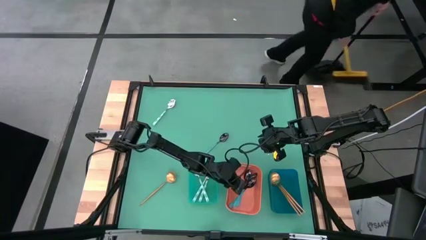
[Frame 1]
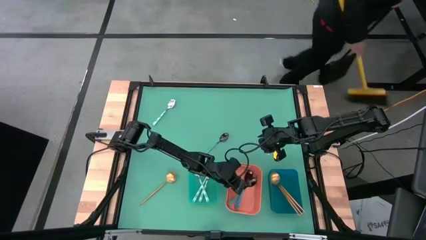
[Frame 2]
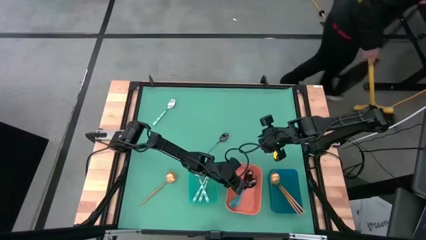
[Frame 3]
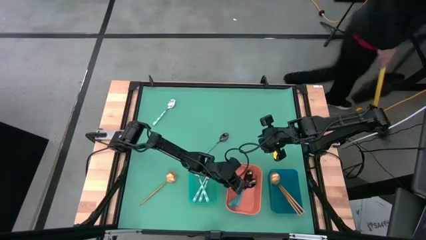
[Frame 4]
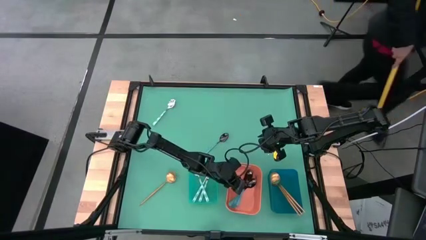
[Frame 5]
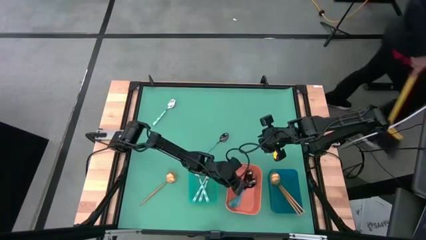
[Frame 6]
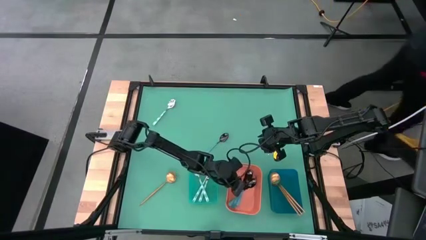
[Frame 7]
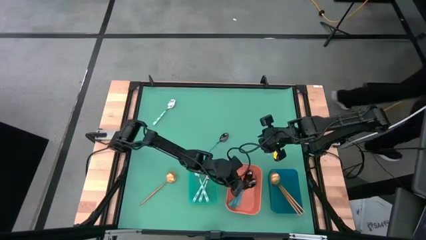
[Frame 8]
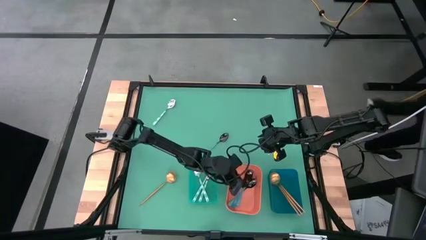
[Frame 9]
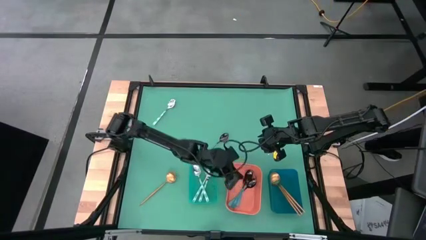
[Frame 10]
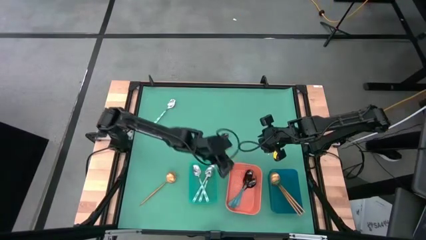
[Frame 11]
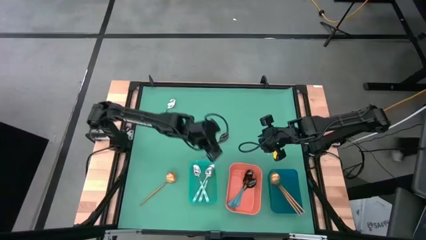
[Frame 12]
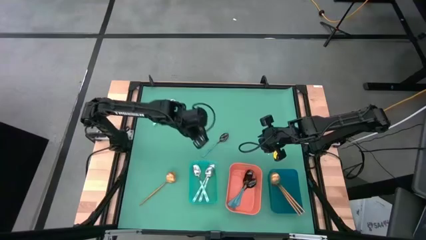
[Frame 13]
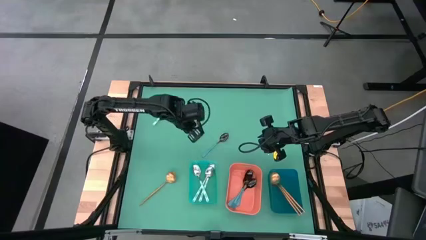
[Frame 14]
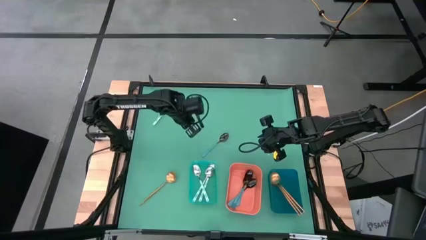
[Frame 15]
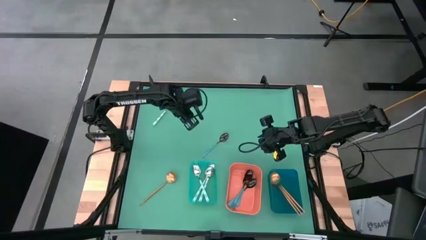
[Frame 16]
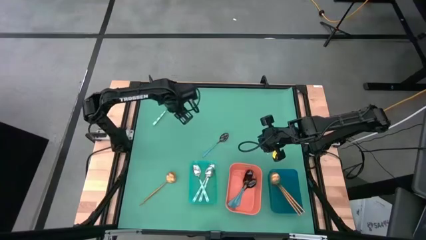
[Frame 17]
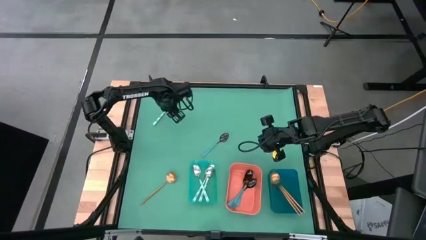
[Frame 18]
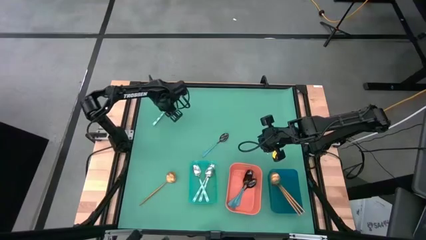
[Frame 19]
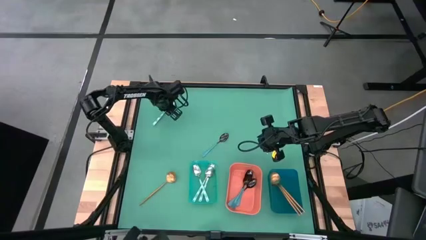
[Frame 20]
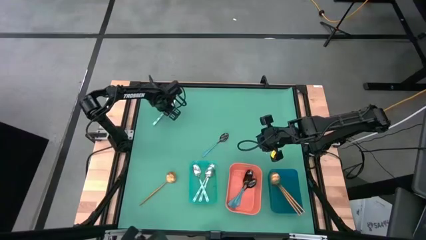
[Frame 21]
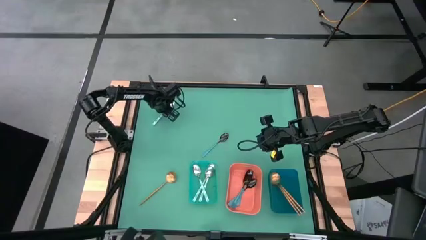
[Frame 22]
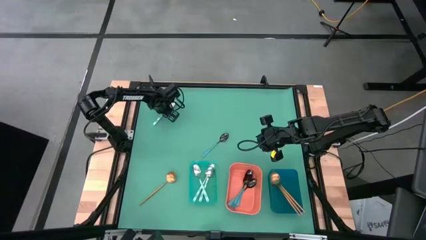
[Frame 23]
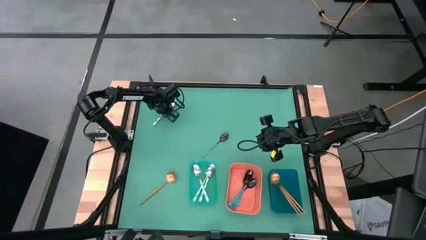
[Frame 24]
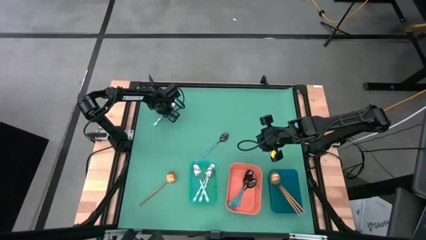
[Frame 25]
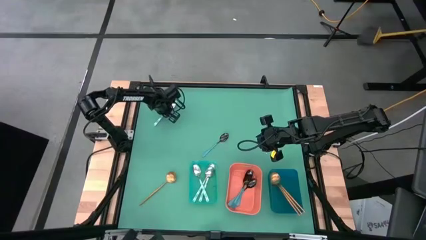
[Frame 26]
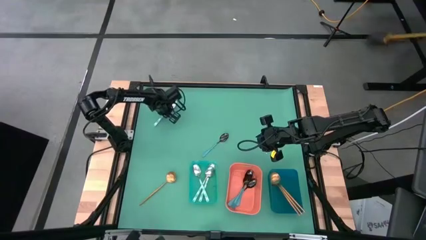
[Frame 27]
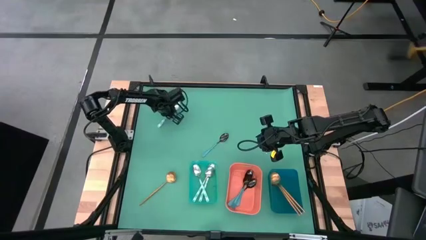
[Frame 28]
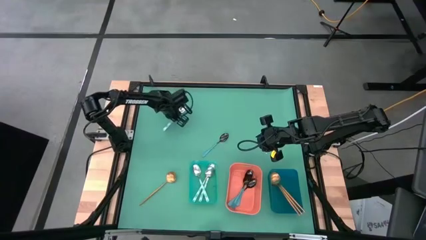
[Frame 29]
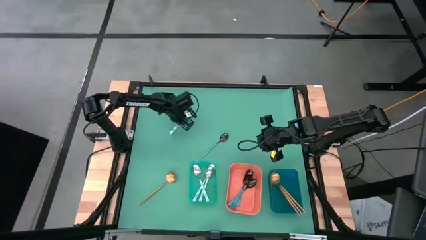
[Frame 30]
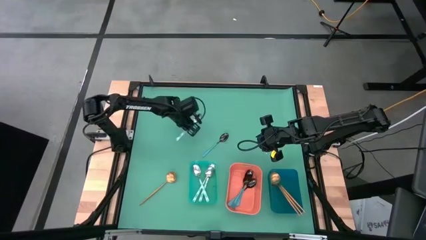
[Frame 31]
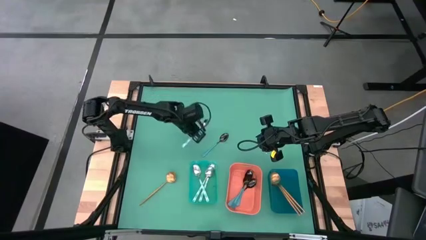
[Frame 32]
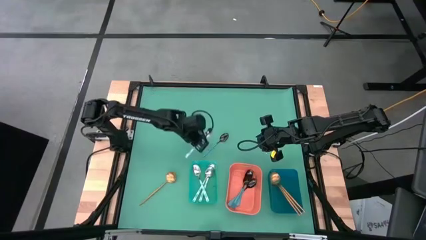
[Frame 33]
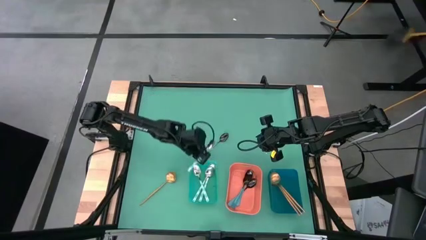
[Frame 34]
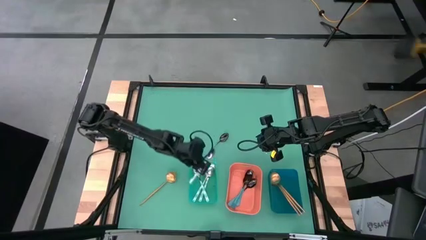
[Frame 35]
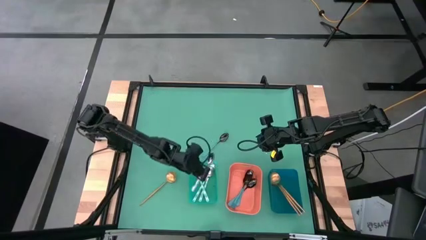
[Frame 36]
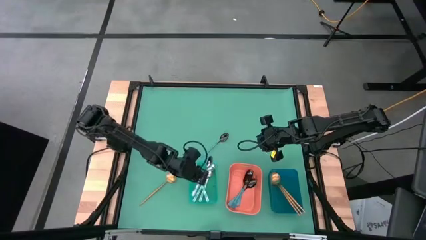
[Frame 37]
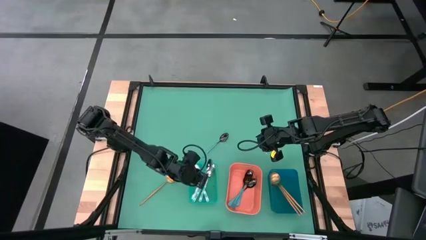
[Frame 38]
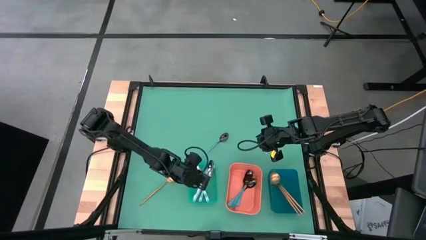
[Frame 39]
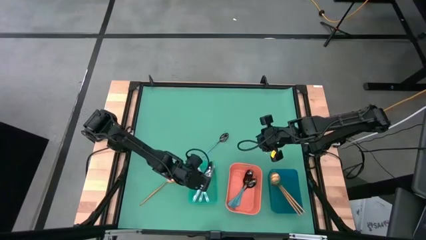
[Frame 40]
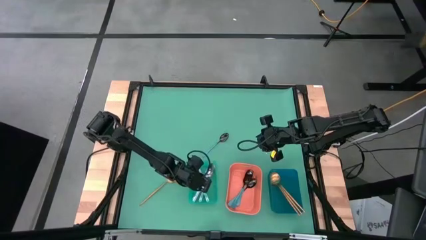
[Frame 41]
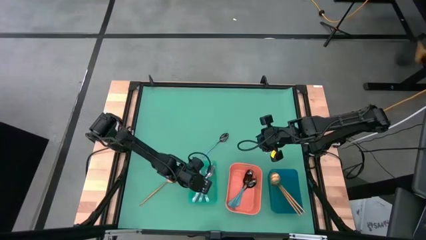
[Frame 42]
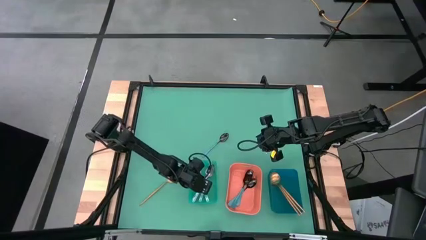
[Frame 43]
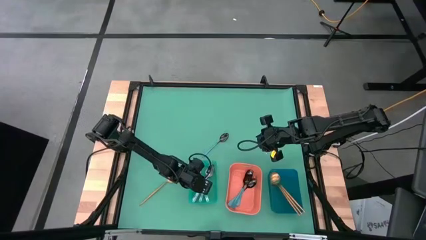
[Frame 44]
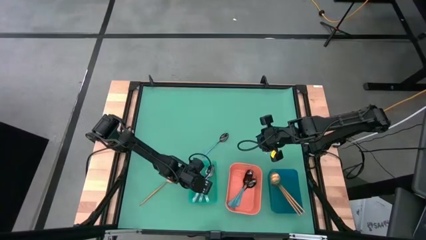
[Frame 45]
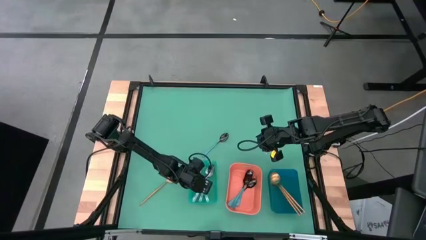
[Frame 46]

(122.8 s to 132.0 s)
Task: Sort silverware by color (type)
Put the light blue spoon into the light blue bin
